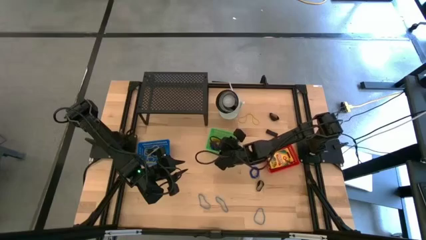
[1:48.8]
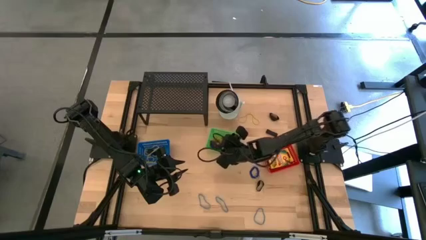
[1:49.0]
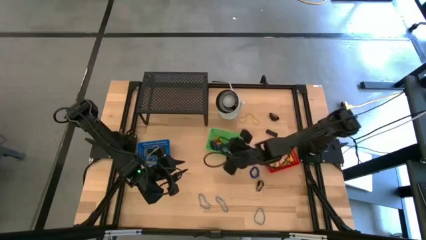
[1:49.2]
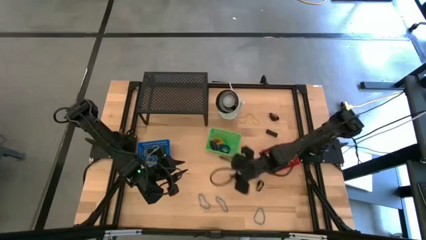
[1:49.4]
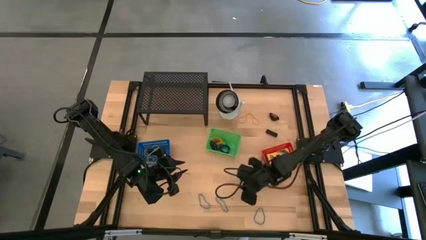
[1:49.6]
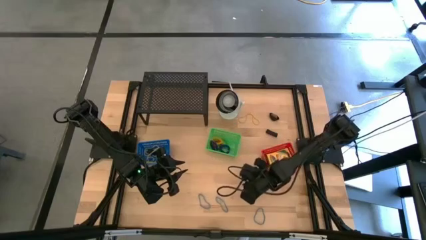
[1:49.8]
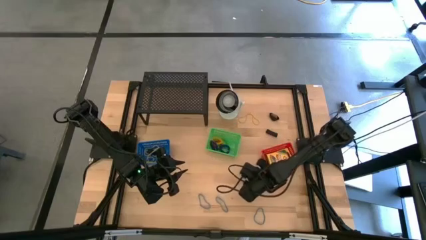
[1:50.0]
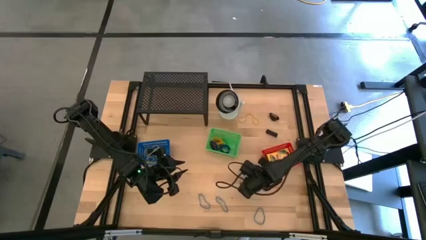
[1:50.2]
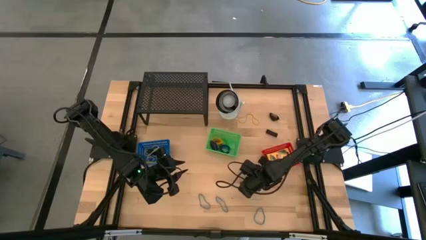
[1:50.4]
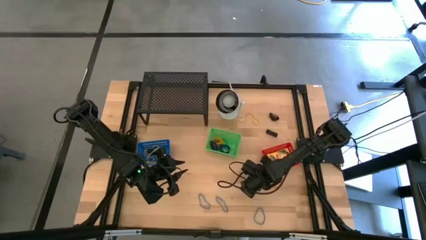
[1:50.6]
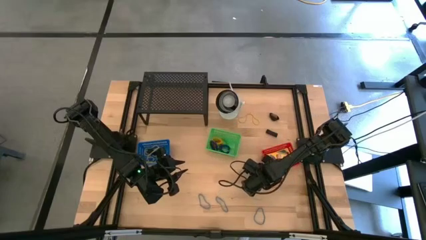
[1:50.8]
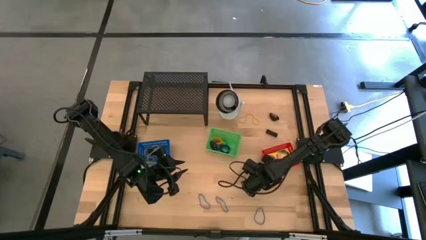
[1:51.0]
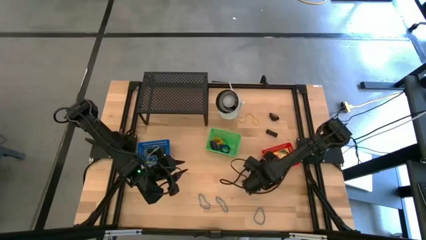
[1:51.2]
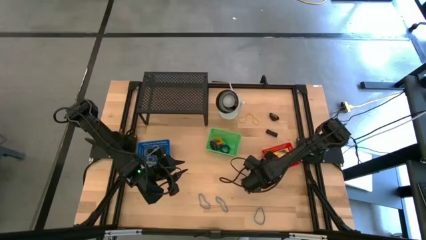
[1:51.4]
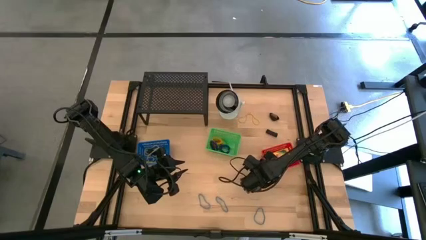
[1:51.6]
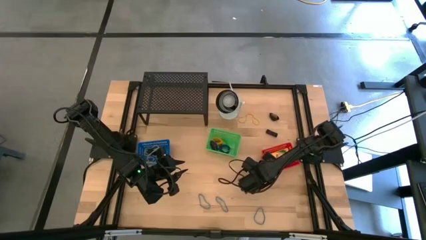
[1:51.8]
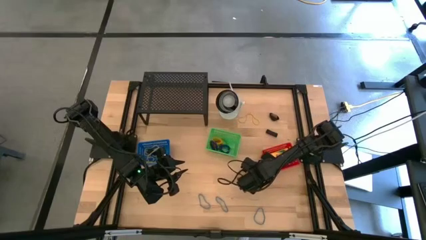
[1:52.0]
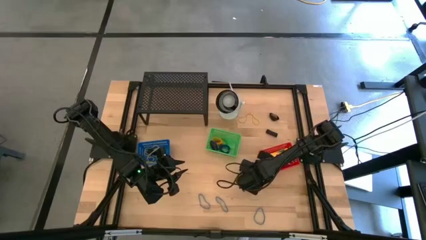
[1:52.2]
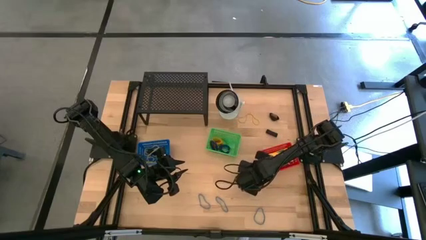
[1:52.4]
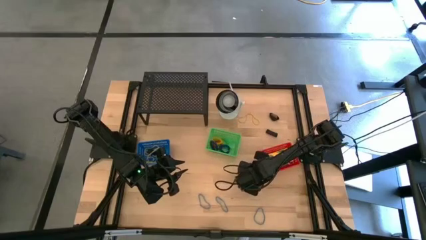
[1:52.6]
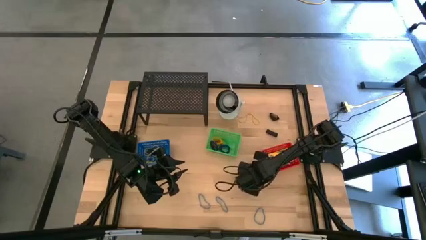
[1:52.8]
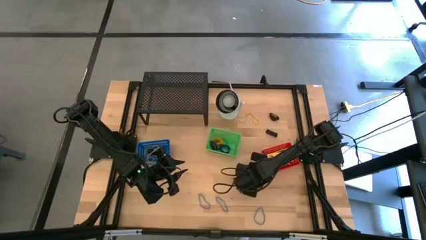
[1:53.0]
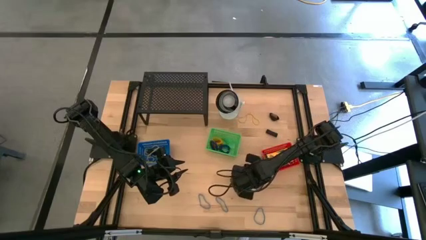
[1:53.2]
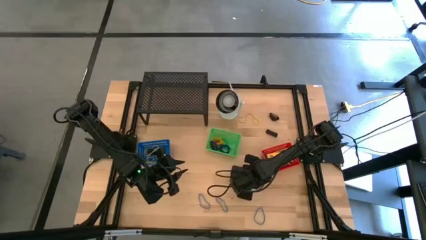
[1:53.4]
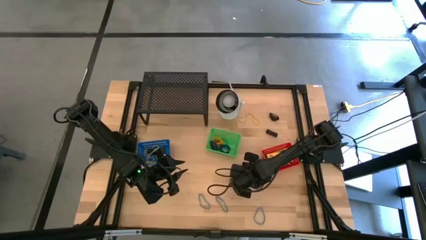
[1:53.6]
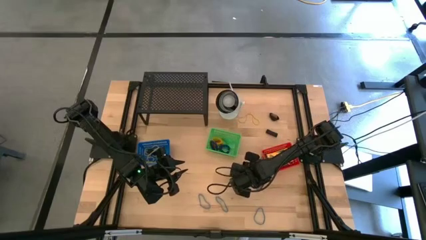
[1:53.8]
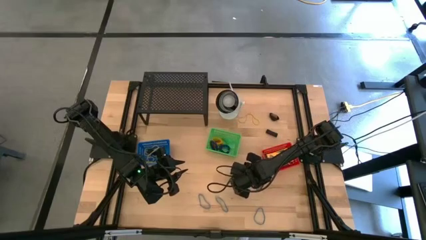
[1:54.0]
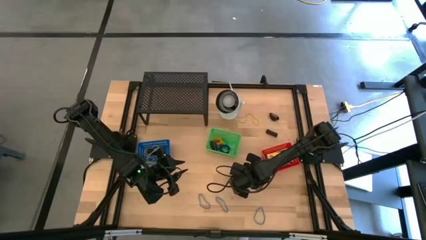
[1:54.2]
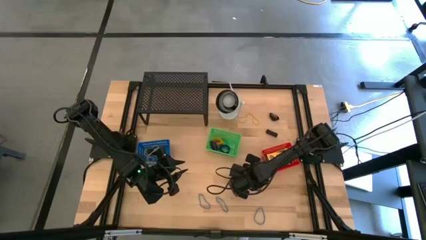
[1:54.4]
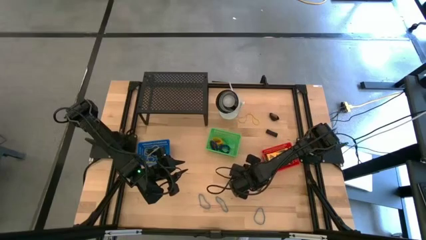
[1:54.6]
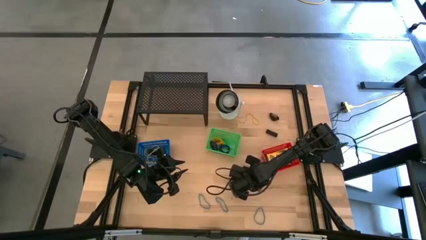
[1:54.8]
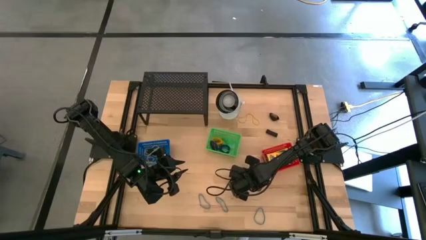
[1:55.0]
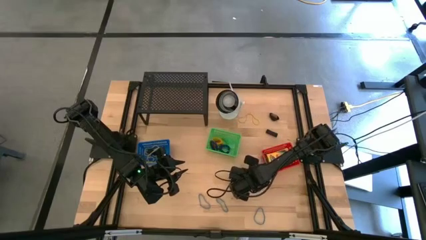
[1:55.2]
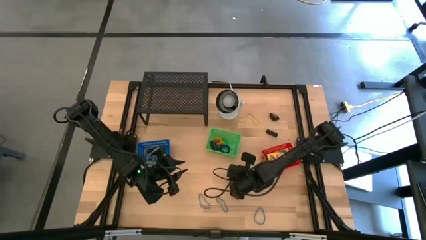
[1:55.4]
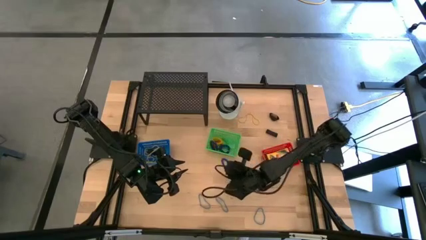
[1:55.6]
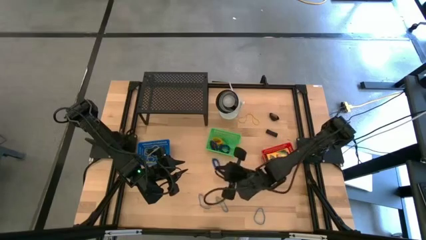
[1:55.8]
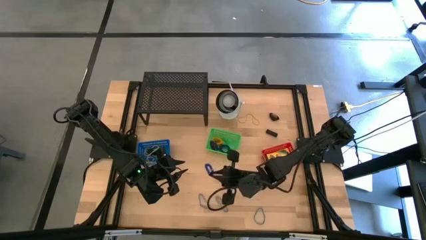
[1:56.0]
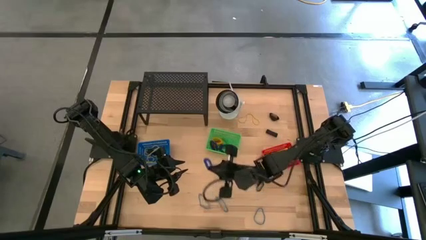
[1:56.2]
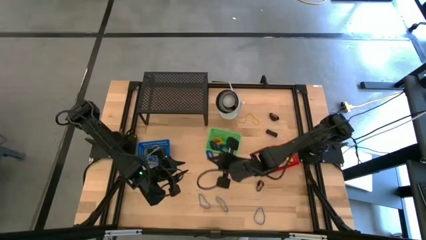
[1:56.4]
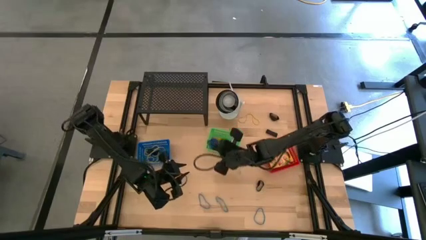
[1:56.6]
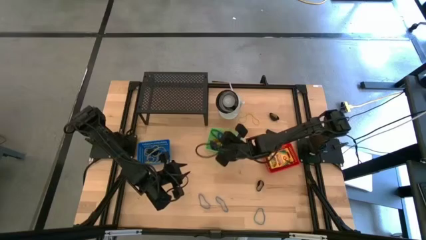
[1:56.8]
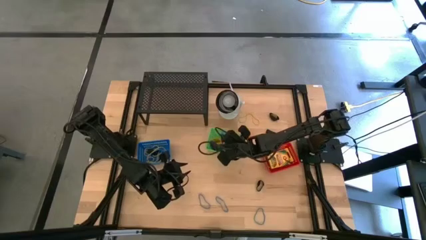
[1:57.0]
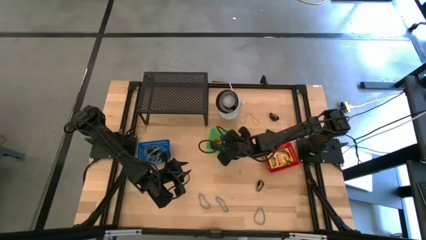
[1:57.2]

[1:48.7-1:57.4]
Task: Pick & Place Office Desk Supplies
Put the blue spring keychain into the green bin

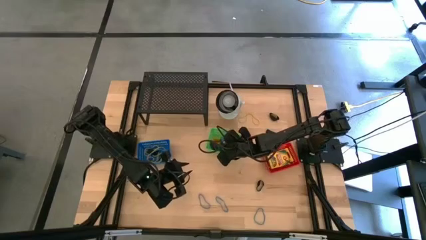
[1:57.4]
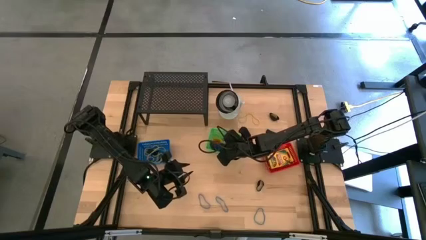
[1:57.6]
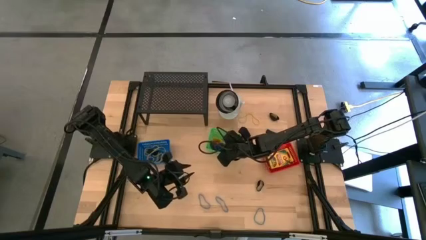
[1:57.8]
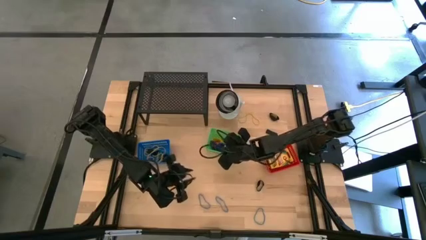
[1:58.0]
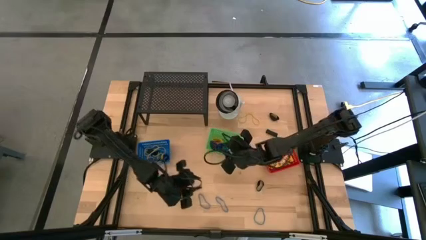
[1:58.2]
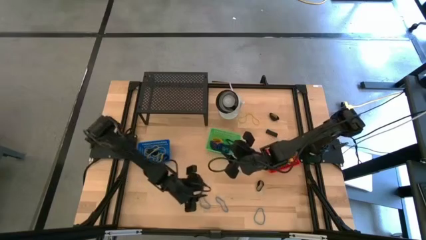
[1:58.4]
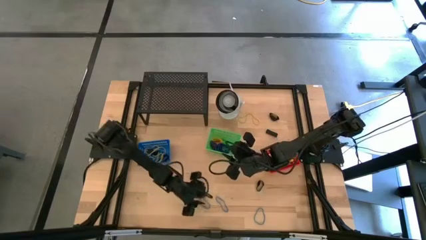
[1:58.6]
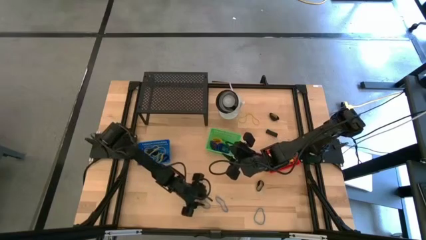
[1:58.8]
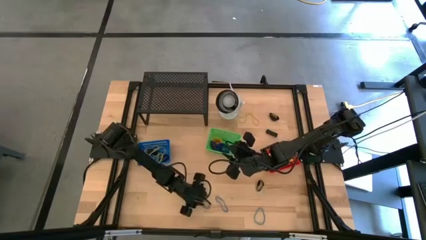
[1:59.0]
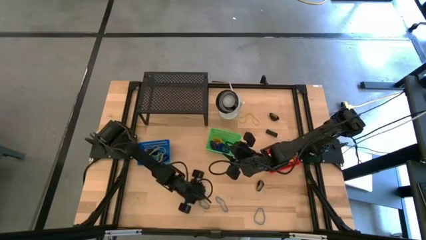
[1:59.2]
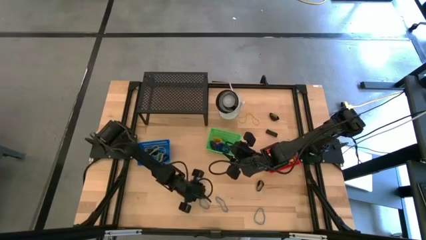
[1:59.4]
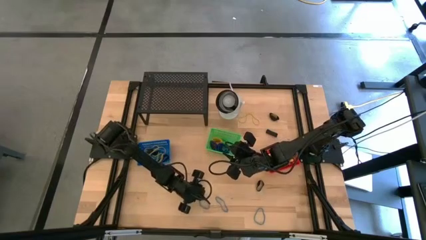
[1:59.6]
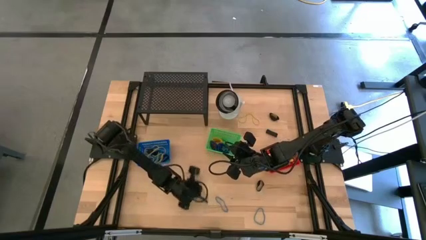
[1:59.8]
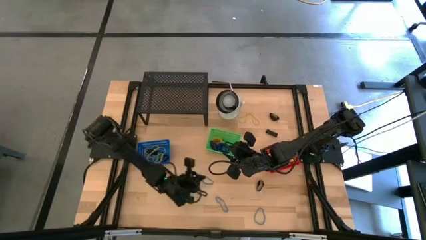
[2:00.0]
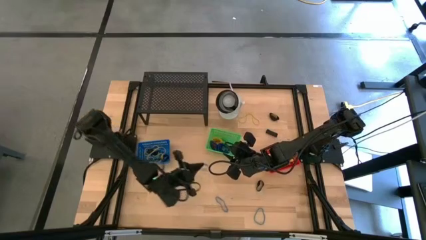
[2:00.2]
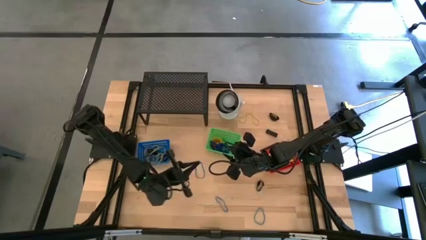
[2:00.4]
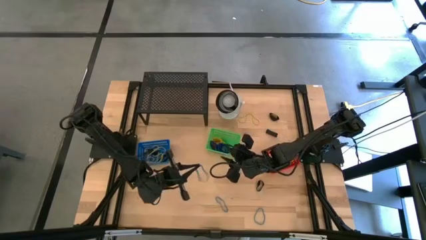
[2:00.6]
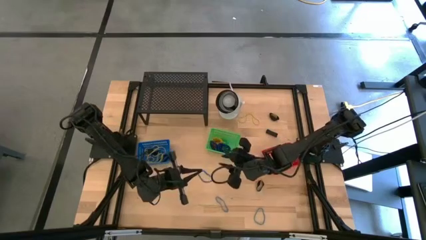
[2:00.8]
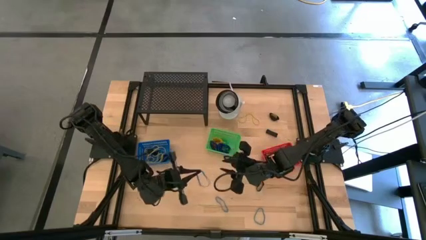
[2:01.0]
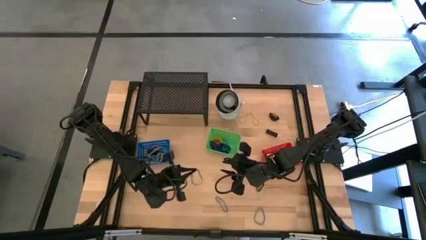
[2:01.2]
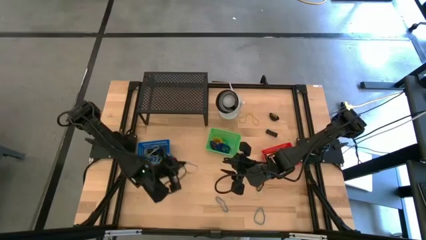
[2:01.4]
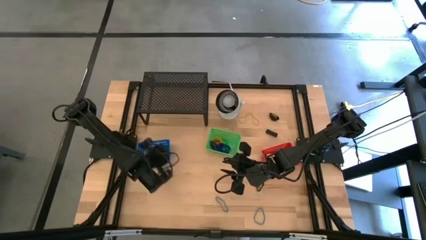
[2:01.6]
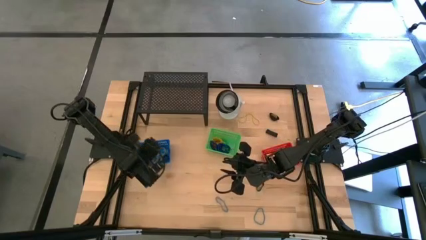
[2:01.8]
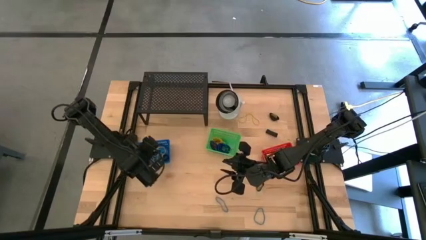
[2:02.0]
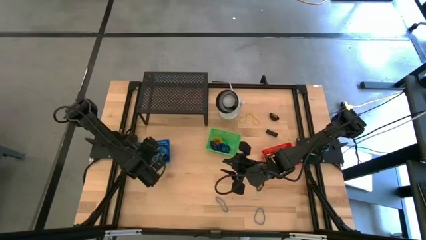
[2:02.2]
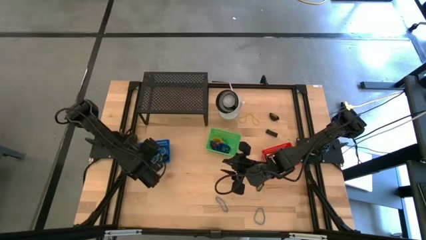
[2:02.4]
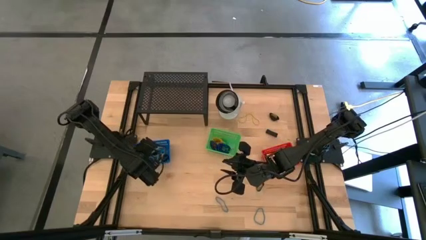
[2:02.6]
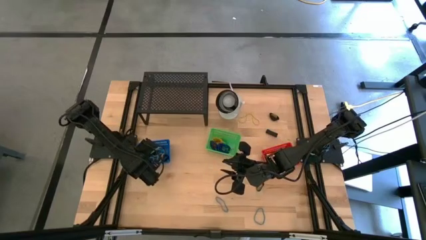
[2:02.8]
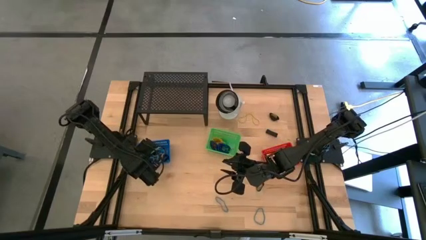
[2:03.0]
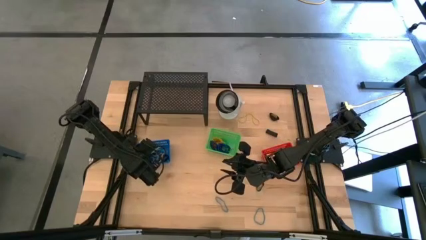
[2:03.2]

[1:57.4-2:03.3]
Put the blue rubber band into the blue bin
